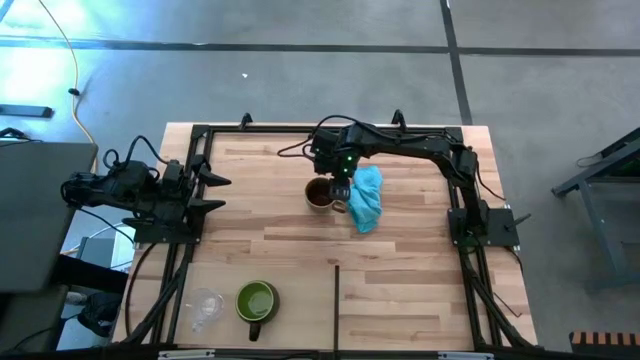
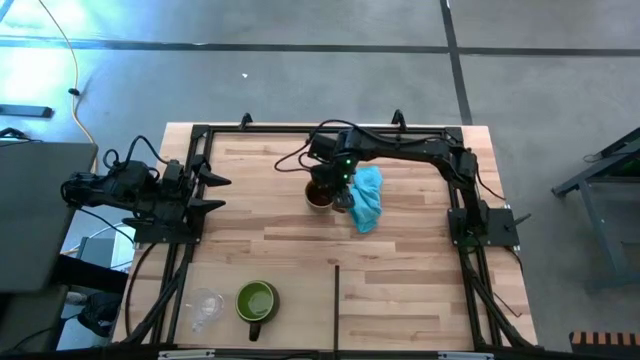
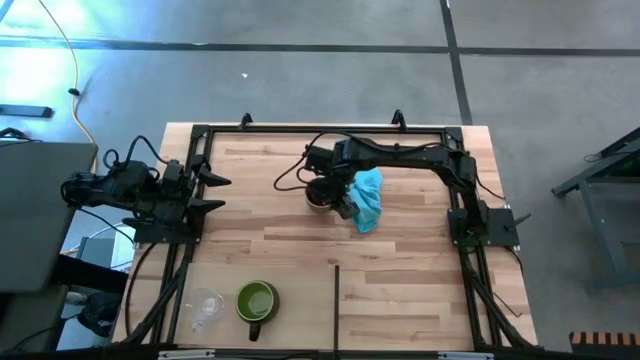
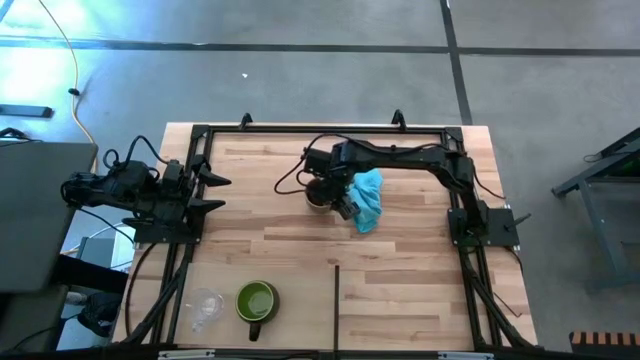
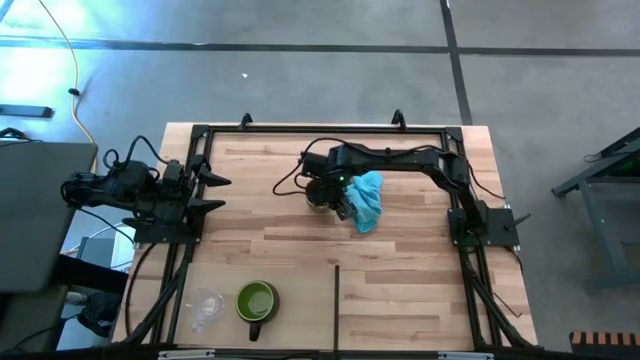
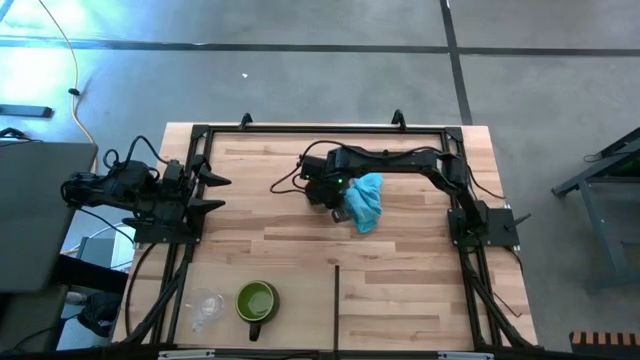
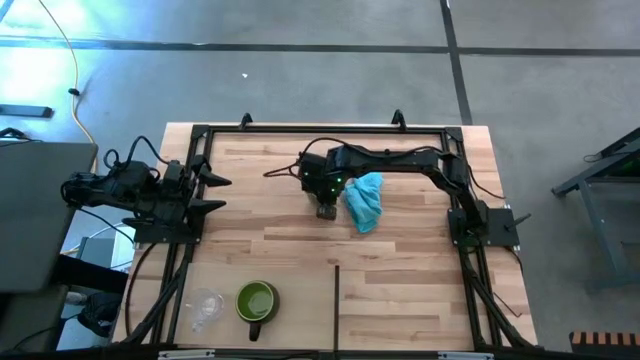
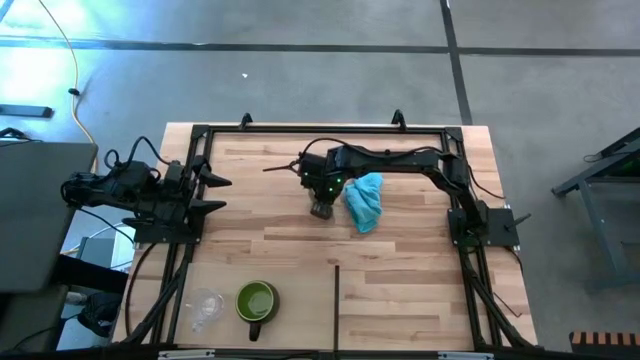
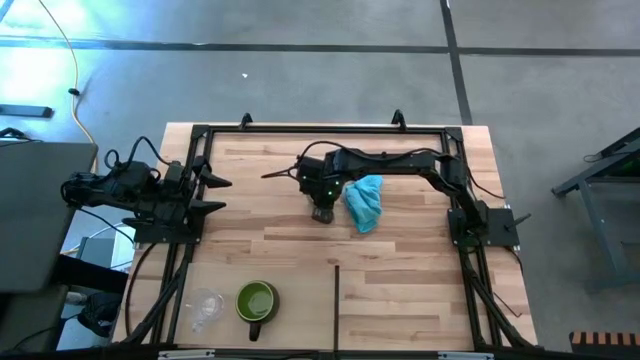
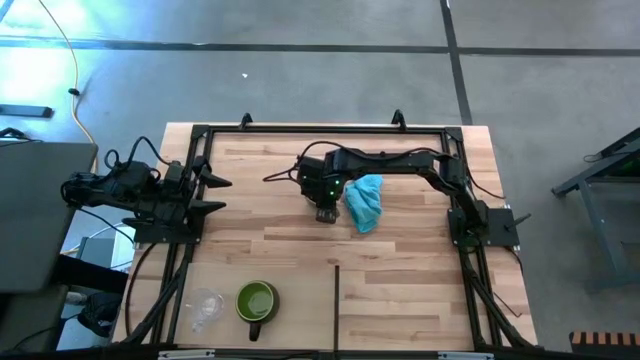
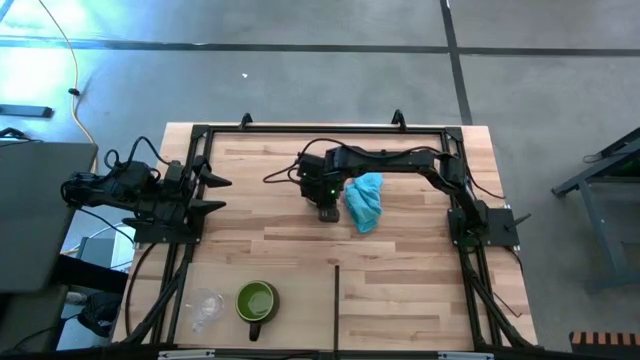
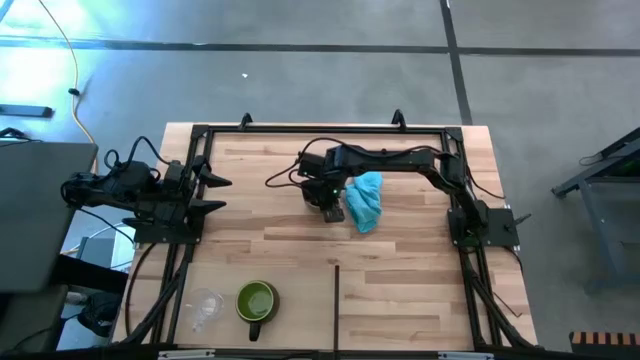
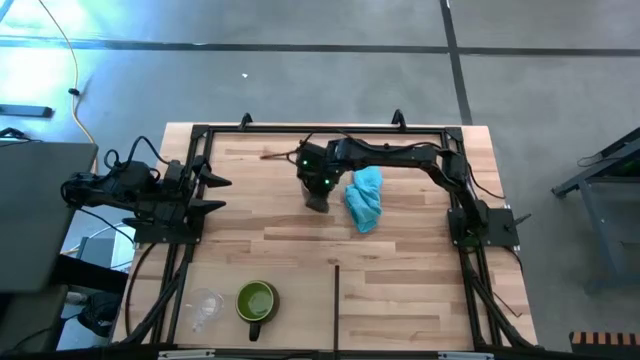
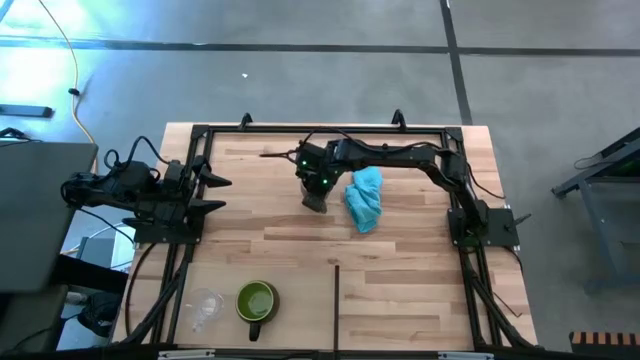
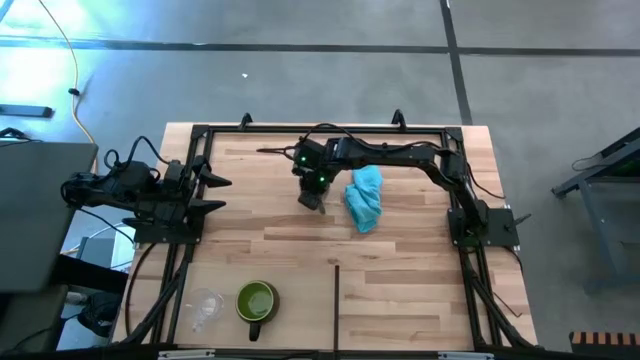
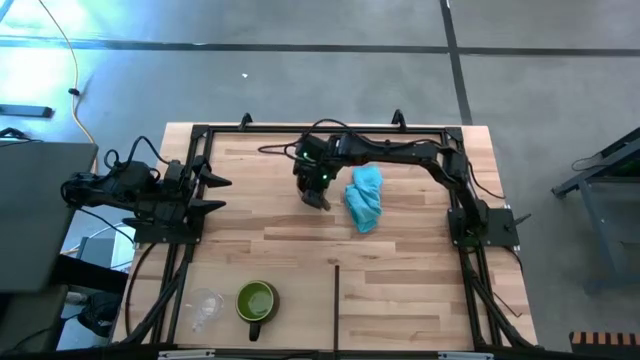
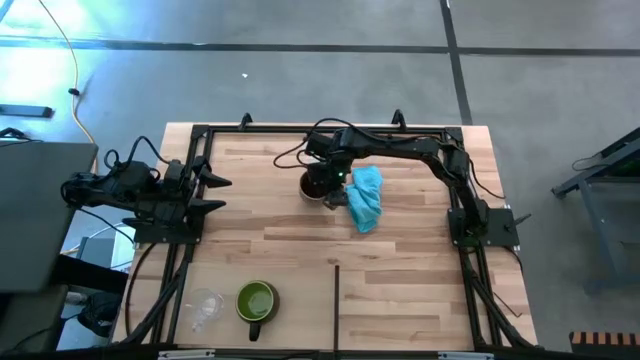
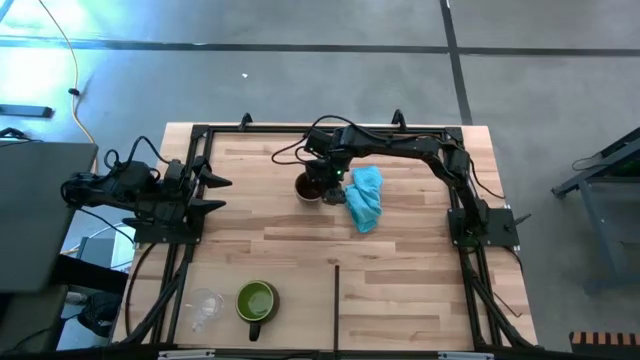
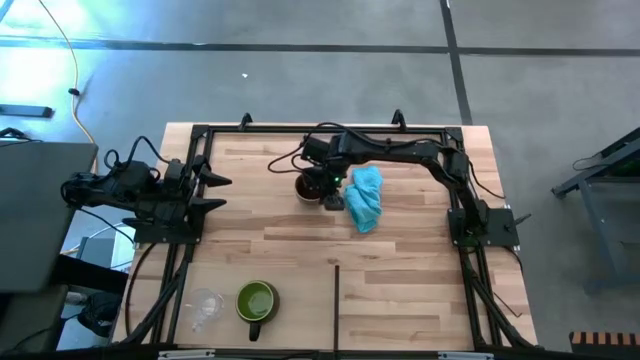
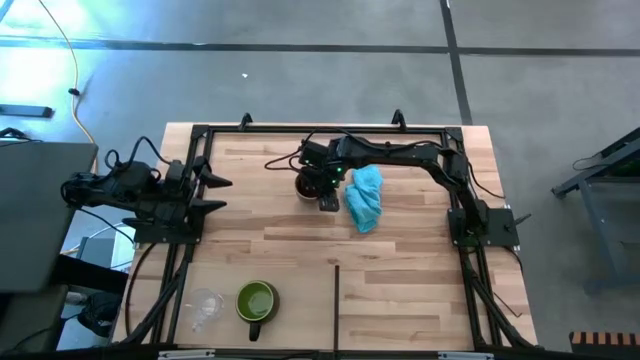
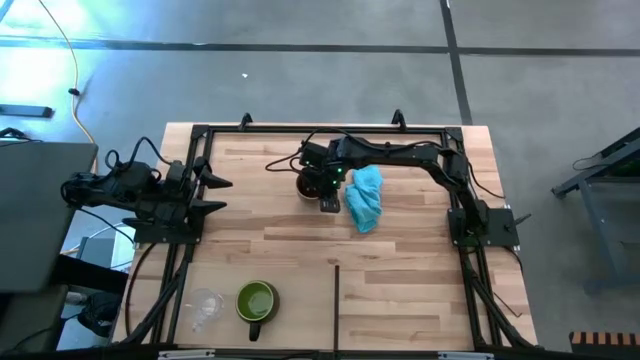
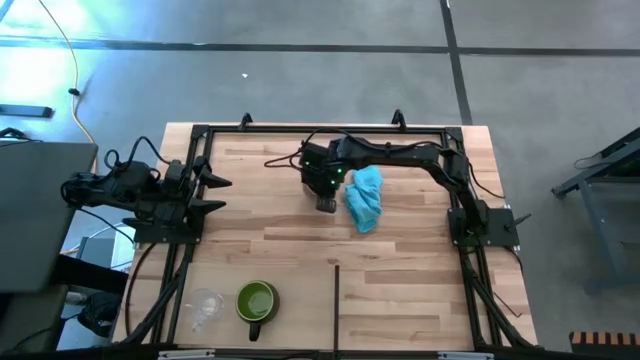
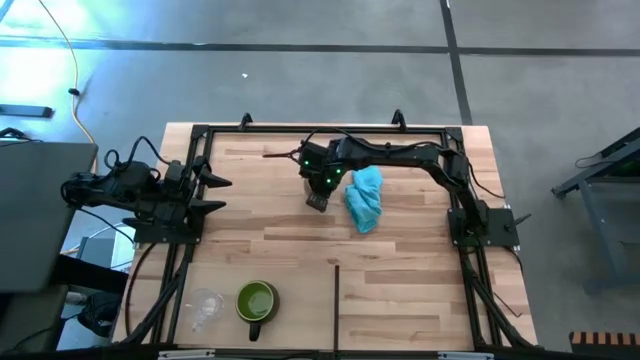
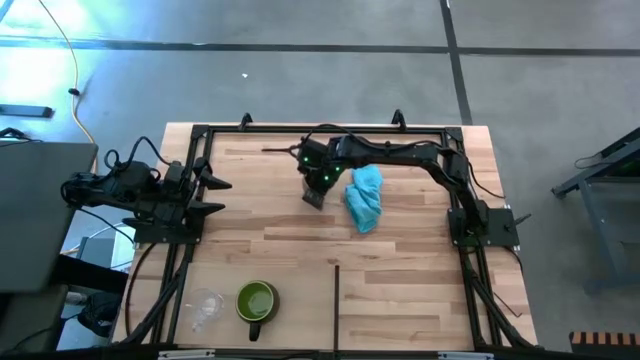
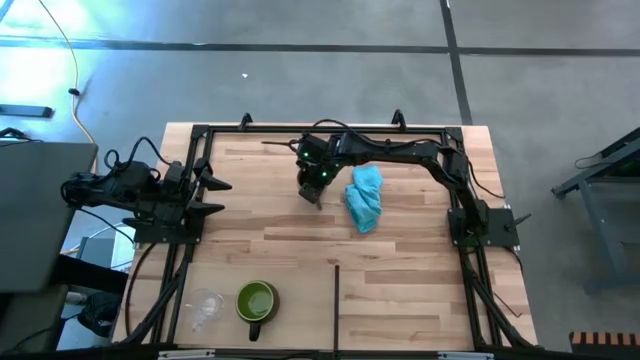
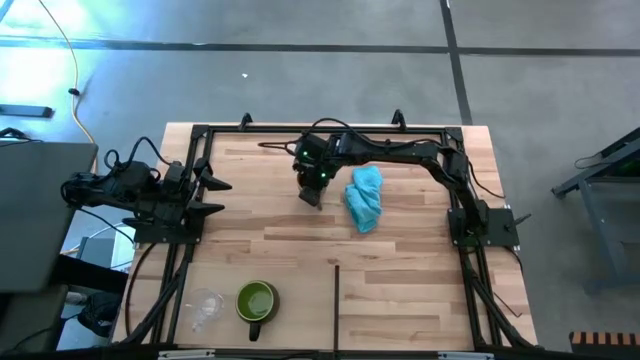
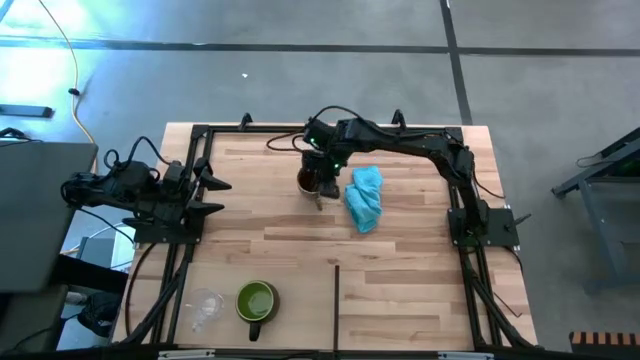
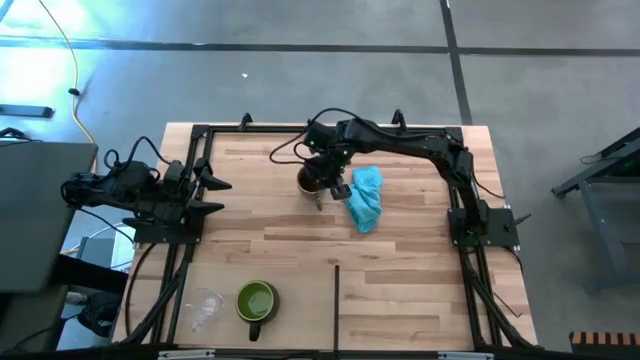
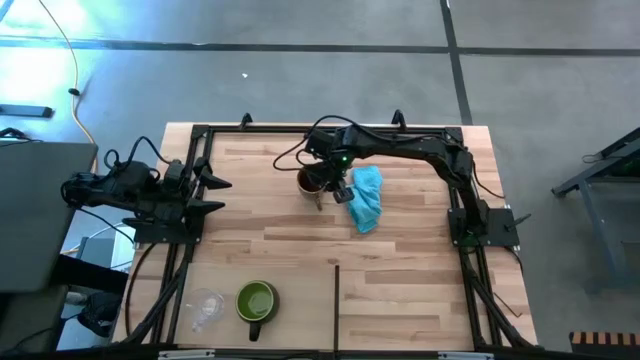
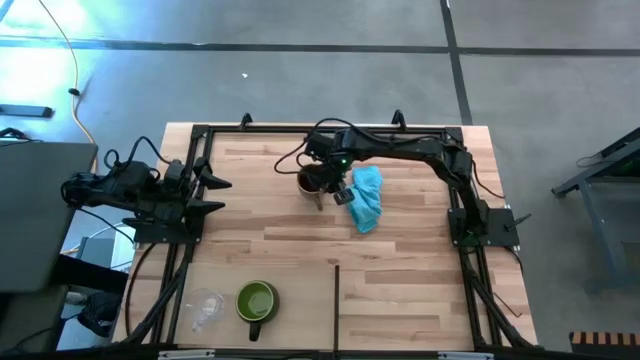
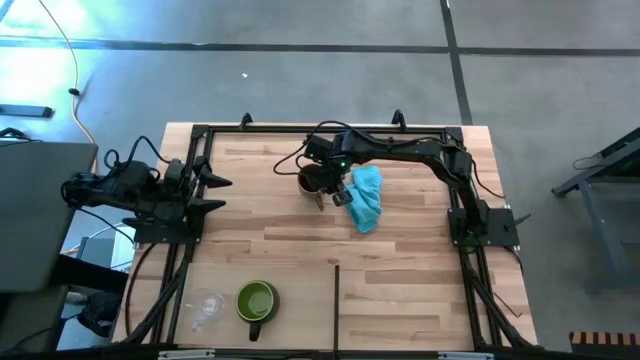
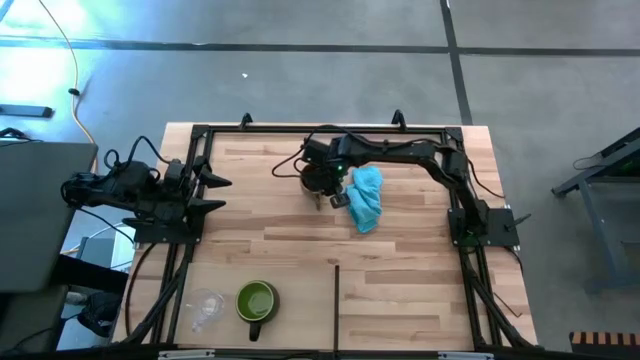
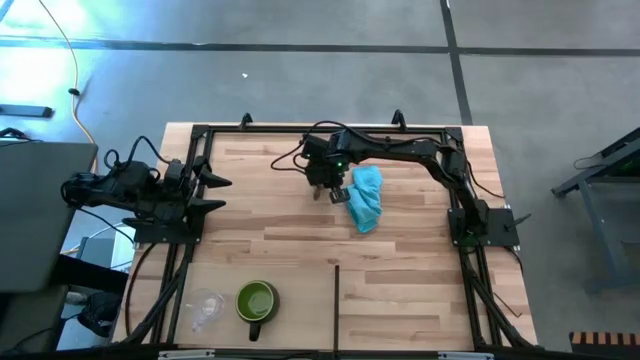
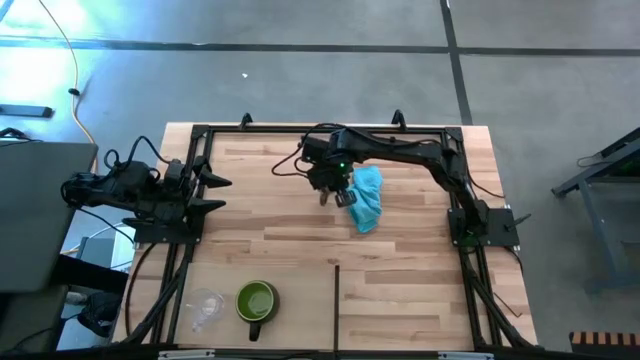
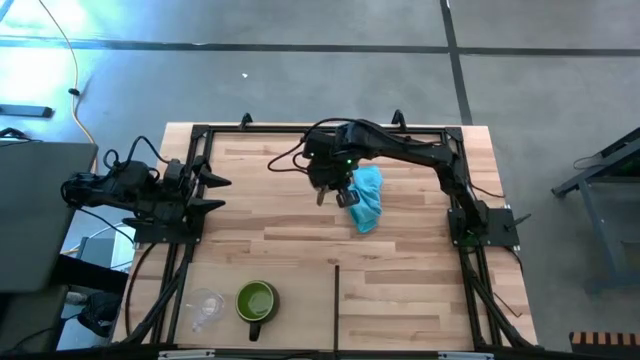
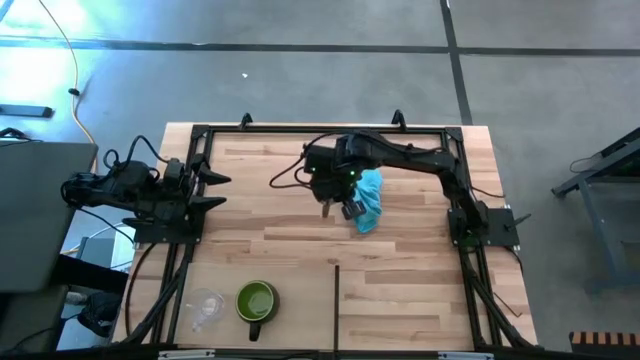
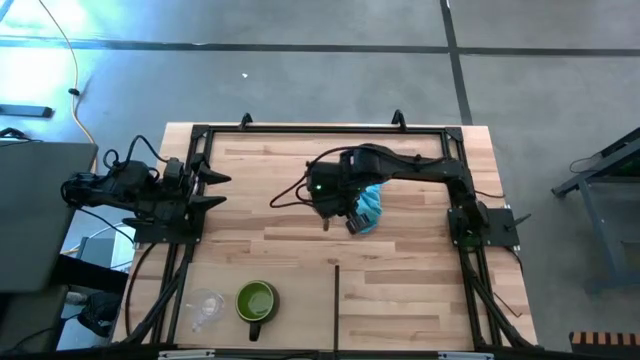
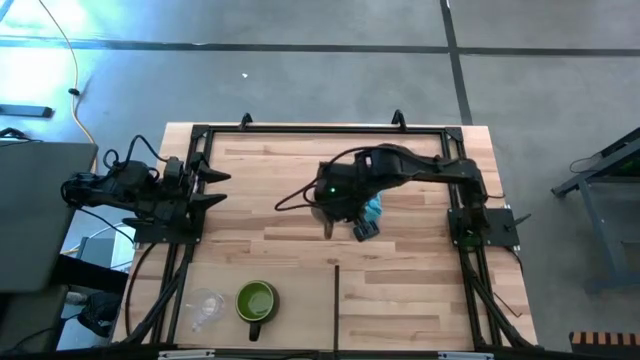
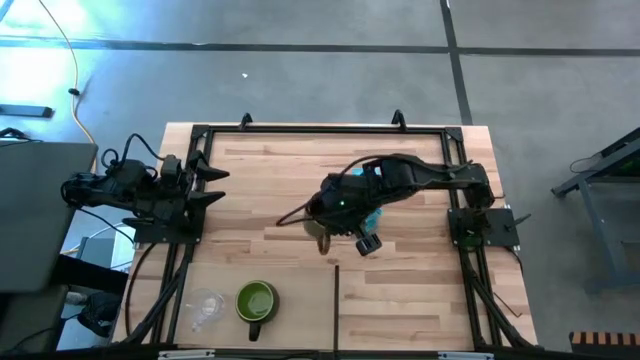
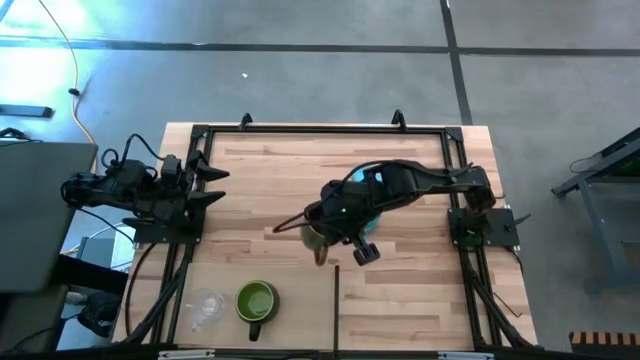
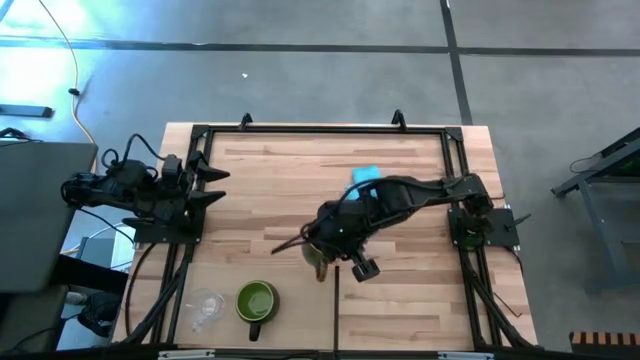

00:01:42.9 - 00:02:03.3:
Task: Stack small to large cups/mugs on shelf
Put the brown mug on the shelf
